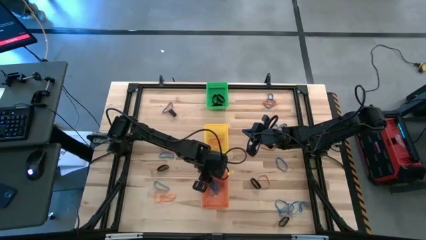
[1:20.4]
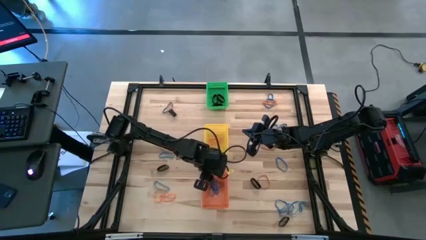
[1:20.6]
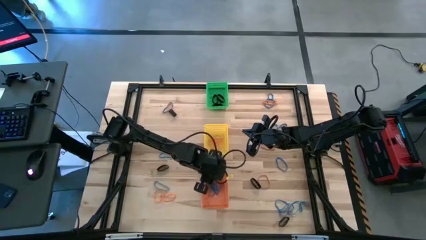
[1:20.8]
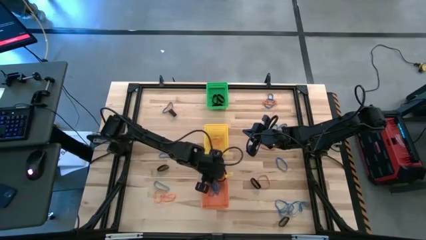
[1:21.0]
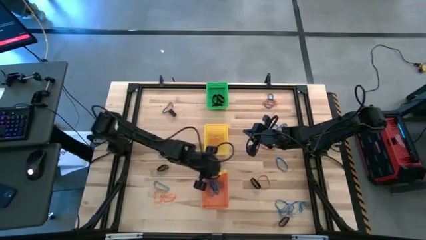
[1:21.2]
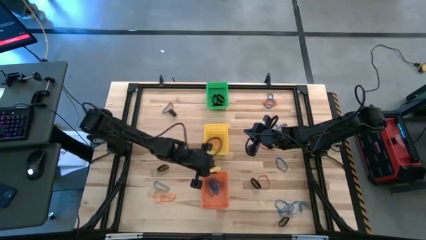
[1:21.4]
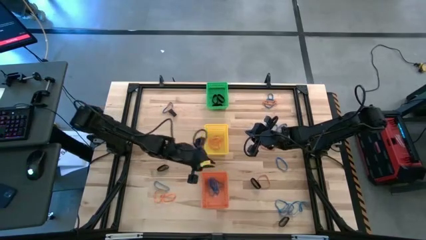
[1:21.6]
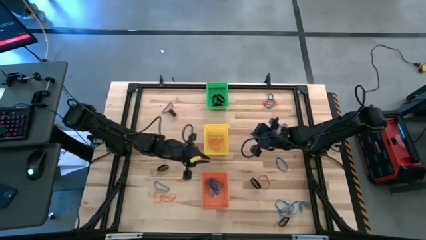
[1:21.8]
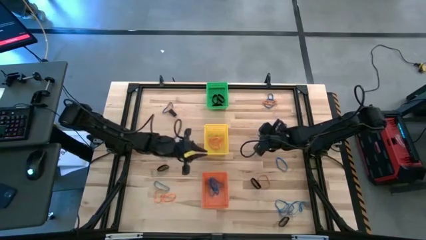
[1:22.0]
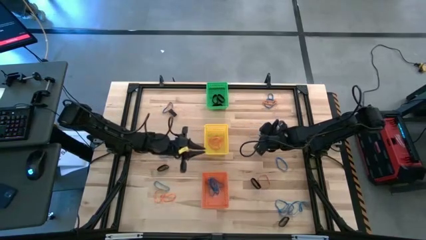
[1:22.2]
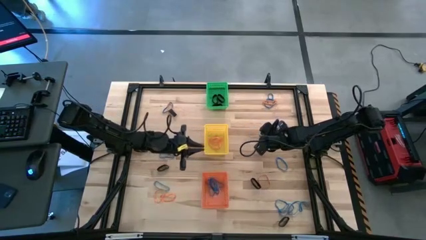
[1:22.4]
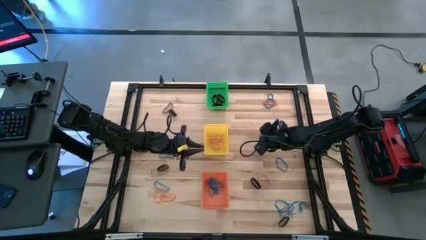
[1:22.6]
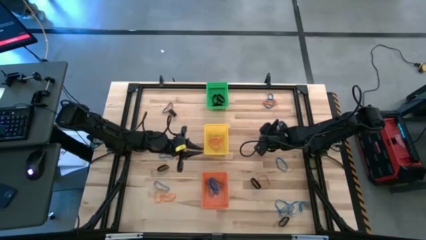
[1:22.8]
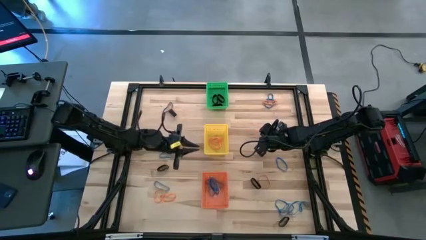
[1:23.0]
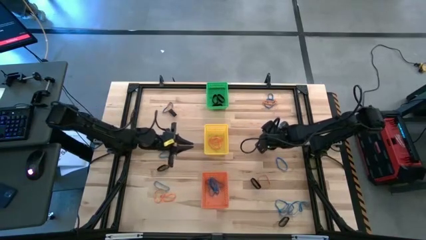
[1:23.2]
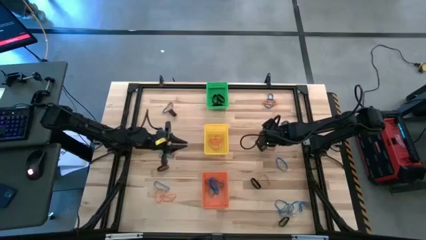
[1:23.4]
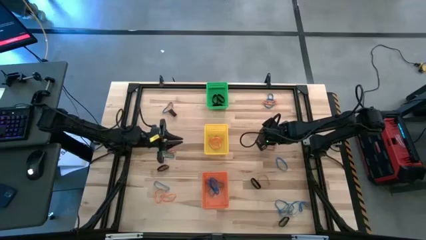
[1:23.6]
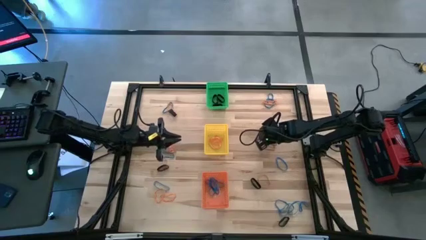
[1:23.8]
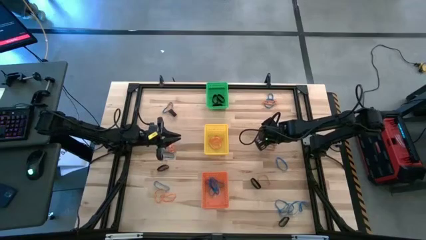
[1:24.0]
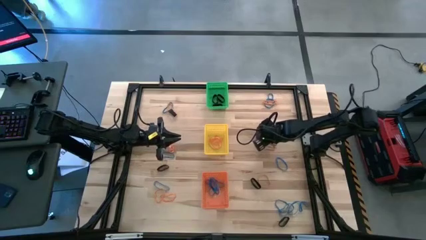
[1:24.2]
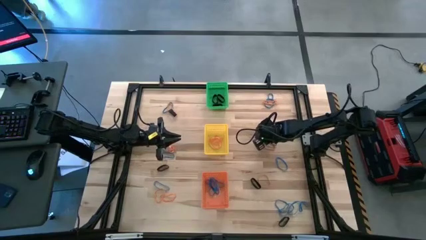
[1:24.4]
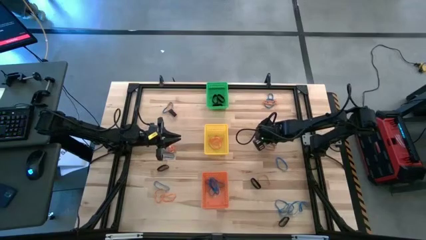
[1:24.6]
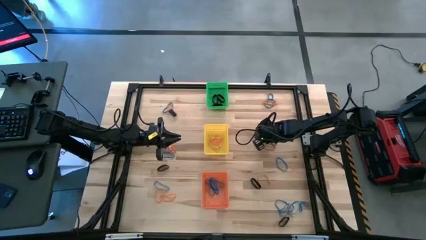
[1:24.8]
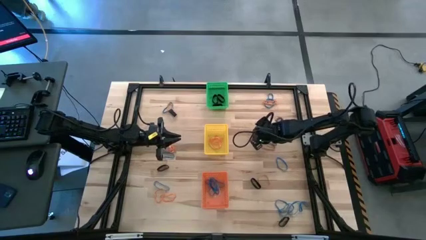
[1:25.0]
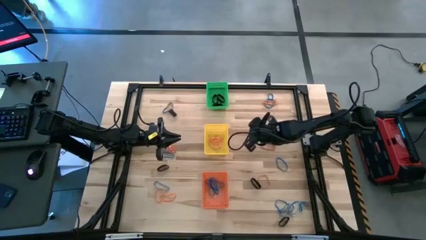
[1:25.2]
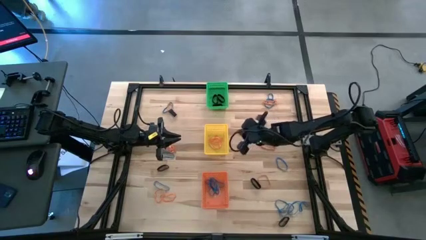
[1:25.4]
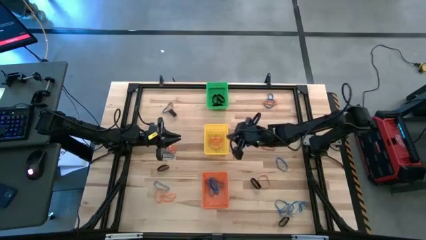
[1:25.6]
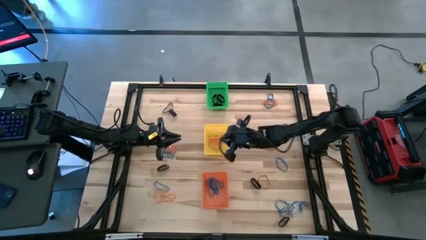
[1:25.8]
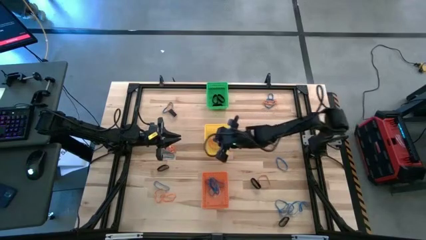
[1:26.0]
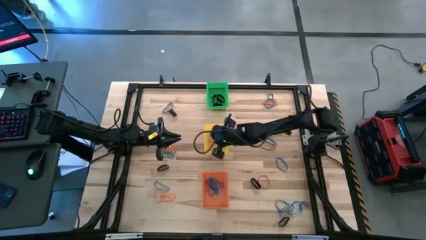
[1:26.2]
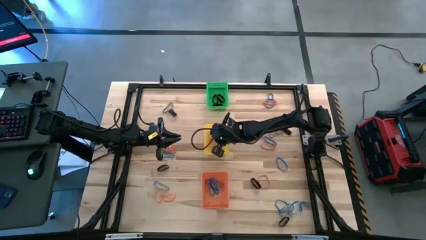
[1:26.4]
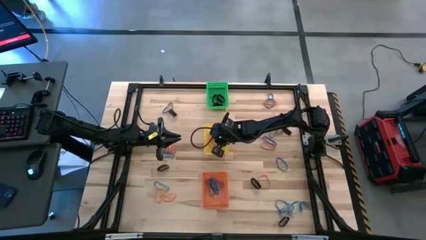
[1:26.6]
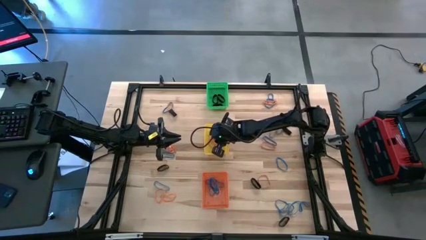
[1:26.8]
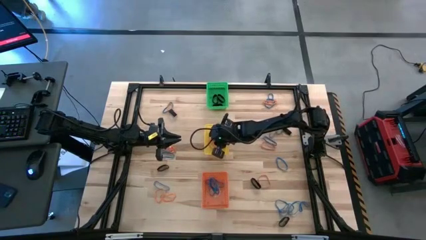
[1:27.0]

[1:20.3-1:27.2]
Task: Sort rubber bands into baskets
Put the orange rubber band into the yellow bin

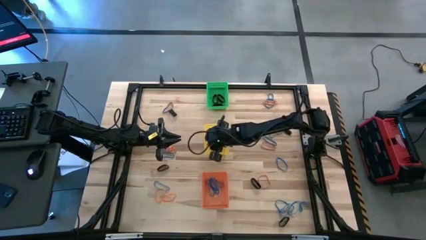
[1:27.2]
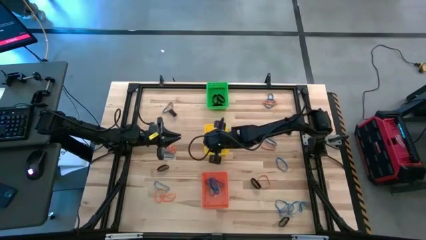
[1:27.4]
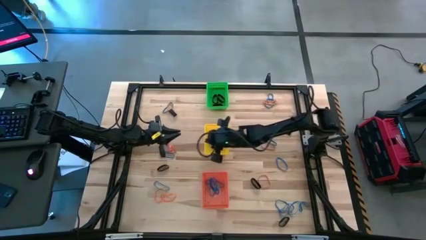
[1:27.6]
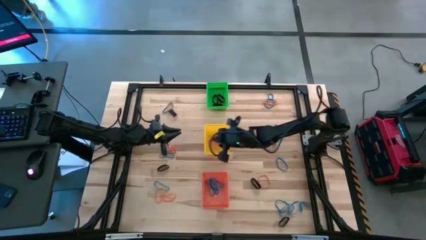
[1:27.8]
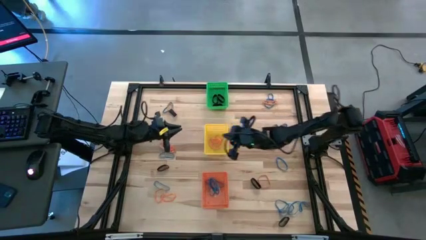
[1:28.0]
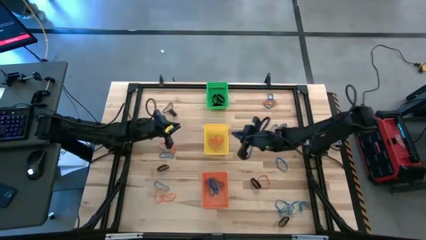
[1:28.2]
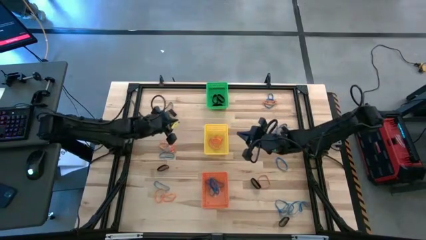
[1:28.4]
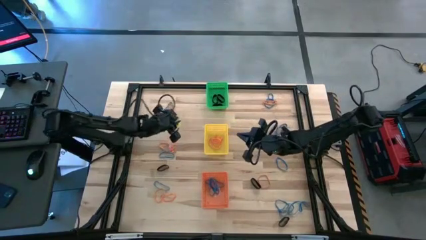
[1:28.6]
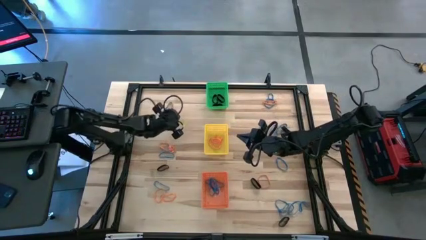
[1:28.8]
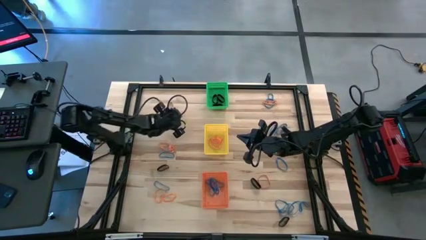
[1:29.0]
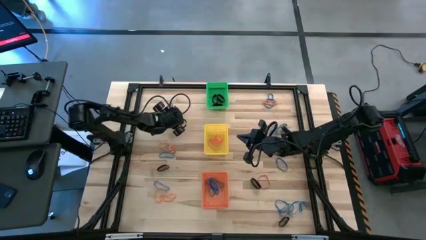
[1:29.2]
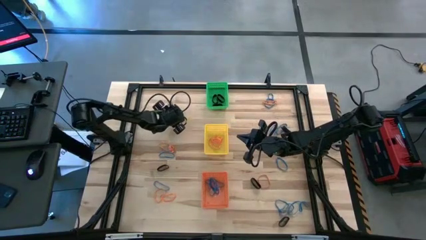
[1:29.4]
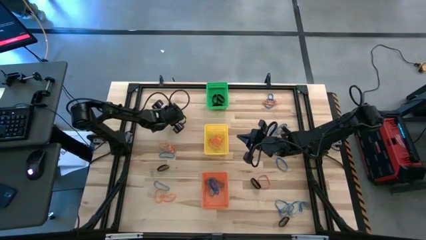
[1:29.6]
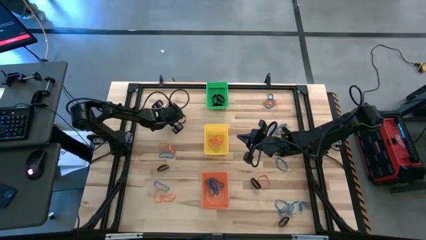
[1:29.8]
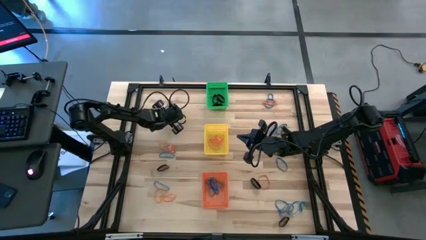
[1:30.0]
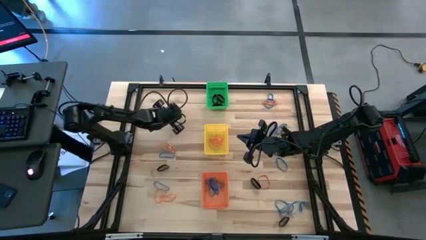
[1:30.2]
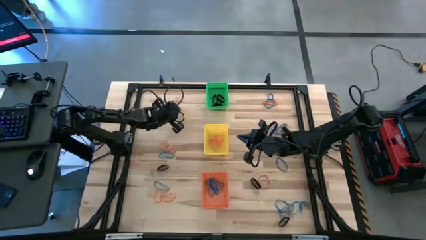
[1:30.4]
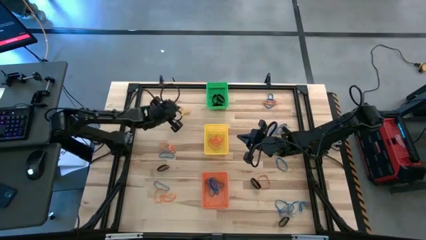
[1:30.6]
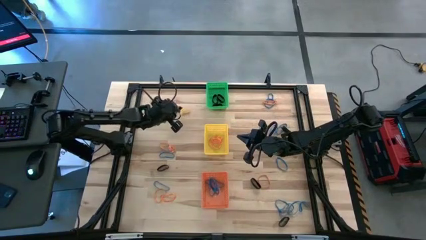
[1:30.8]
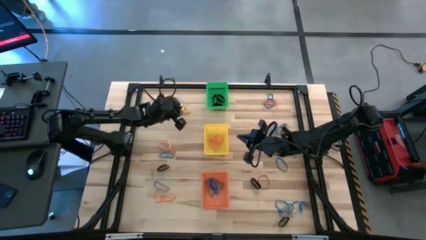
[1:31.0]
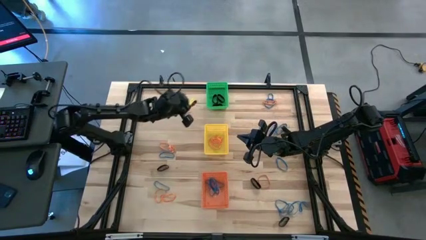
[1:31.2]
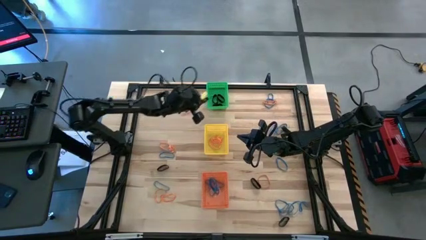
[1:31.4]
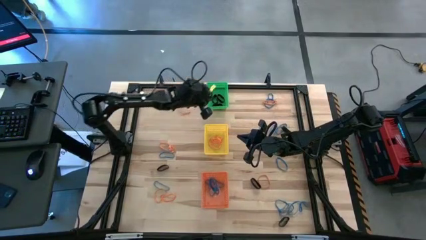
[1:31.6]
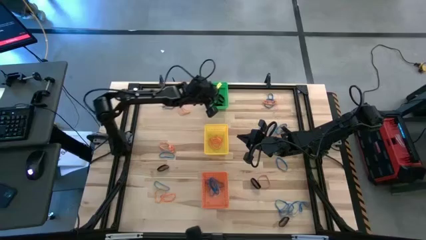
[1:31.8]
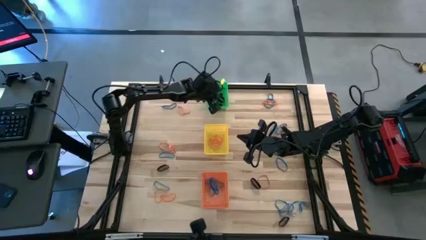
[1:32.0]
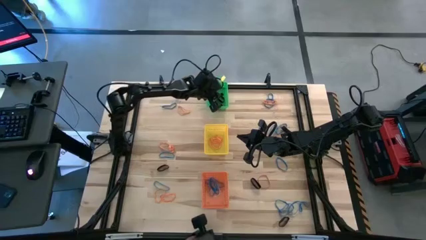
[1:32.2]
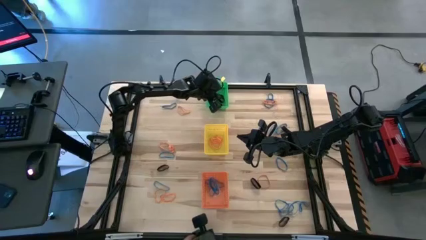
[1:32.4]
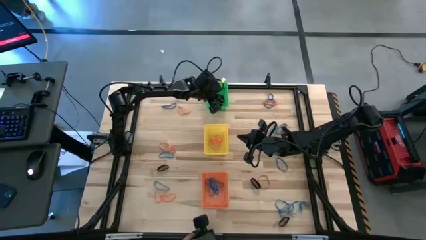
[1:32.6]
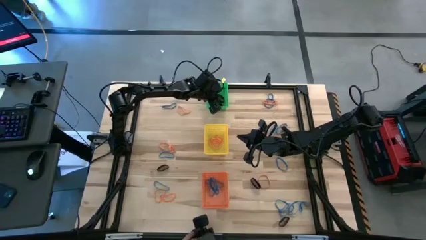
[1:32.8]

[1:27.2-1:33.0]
Put the black rubber band into the green bin

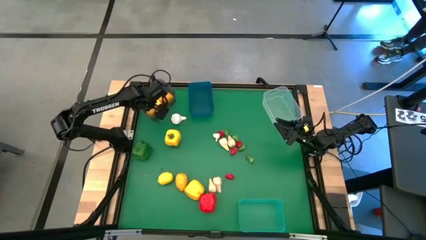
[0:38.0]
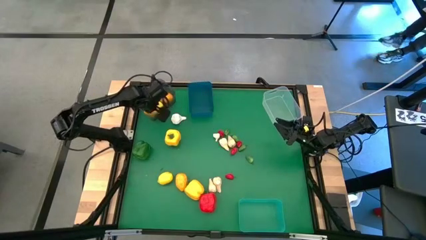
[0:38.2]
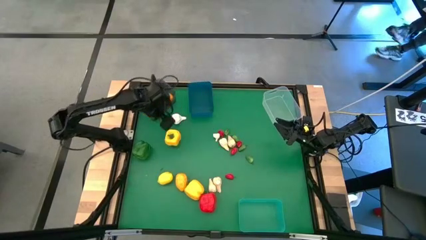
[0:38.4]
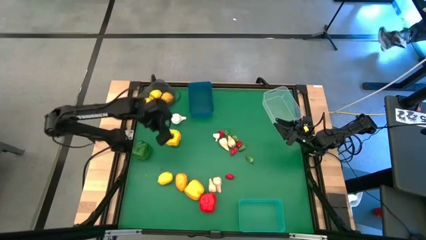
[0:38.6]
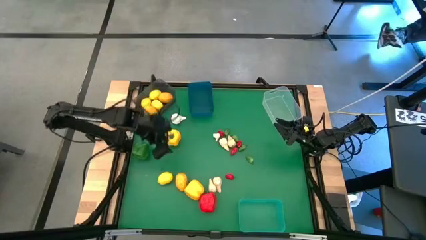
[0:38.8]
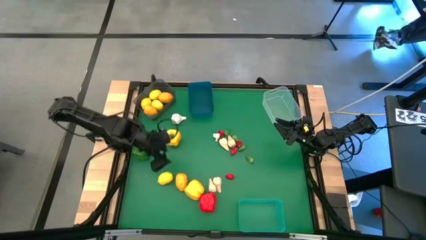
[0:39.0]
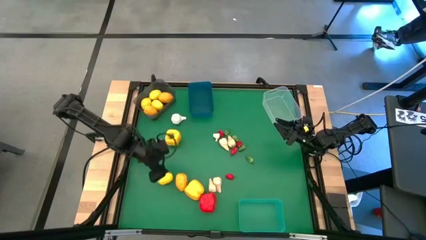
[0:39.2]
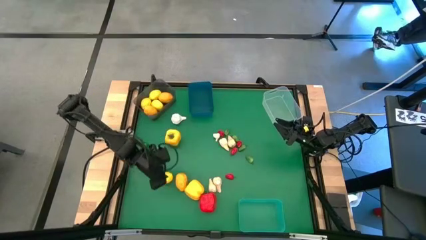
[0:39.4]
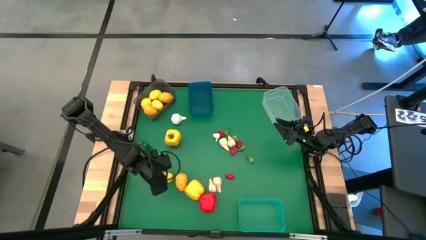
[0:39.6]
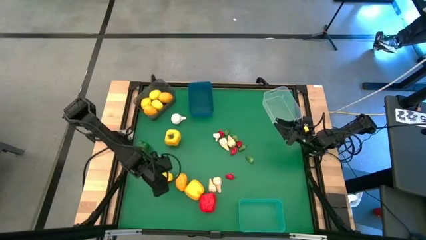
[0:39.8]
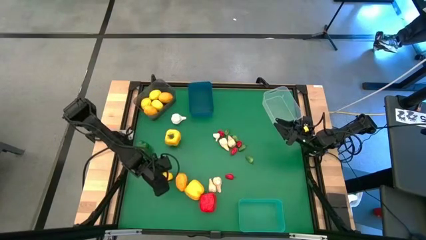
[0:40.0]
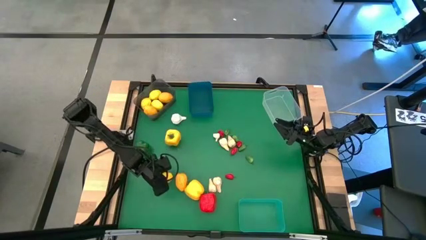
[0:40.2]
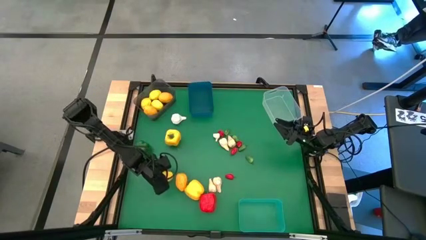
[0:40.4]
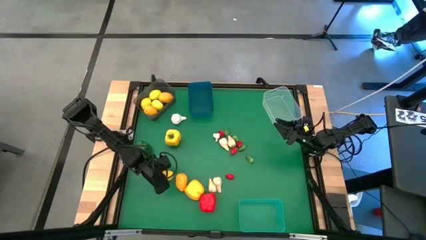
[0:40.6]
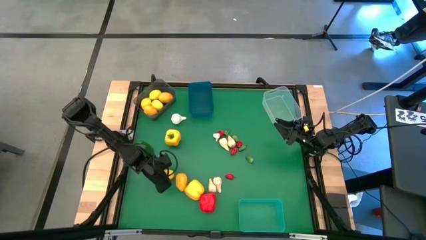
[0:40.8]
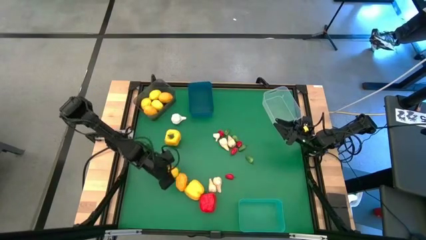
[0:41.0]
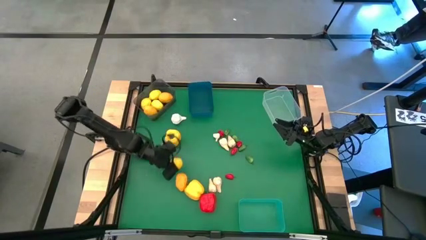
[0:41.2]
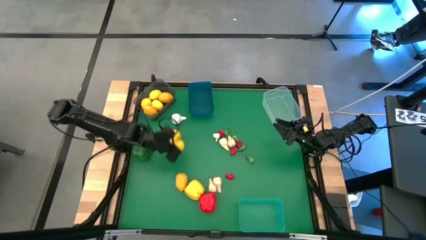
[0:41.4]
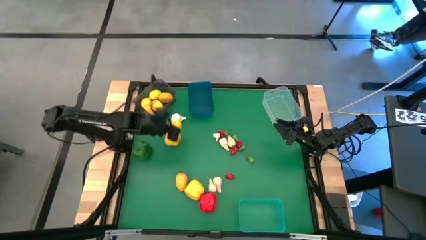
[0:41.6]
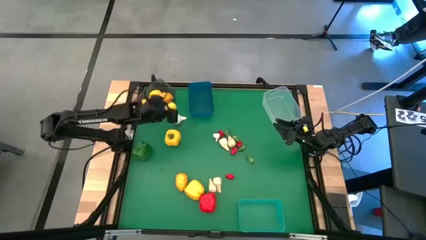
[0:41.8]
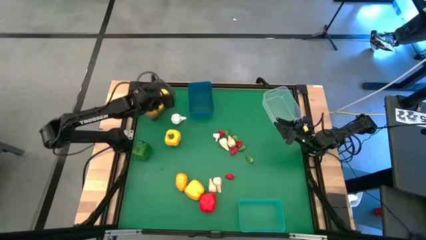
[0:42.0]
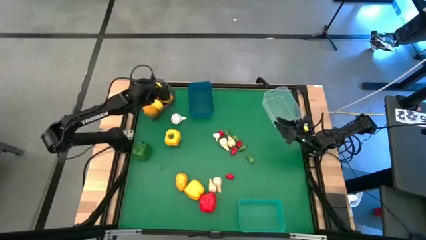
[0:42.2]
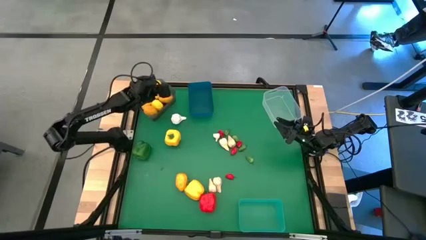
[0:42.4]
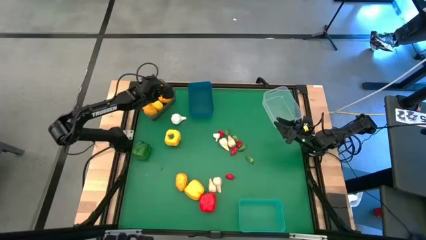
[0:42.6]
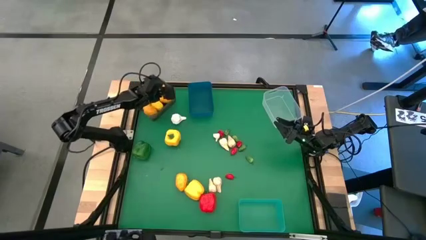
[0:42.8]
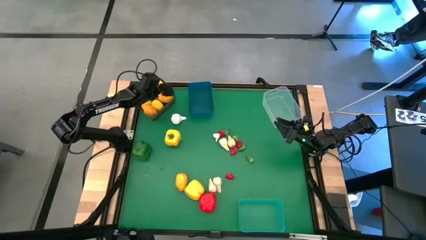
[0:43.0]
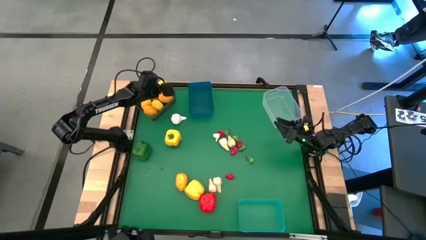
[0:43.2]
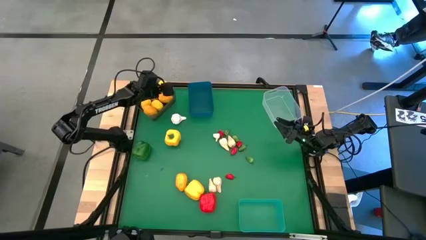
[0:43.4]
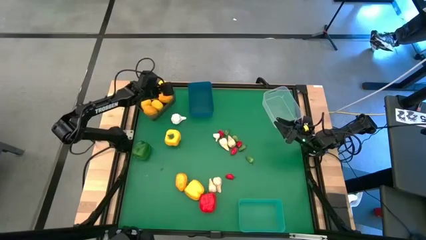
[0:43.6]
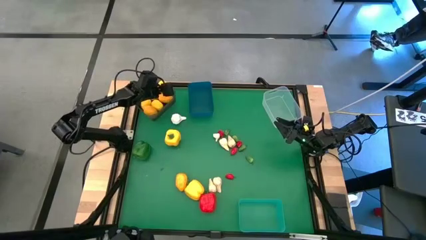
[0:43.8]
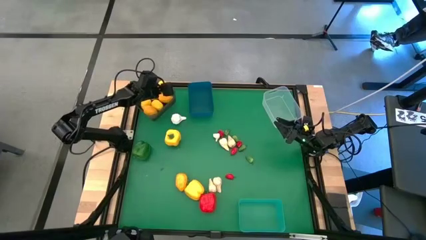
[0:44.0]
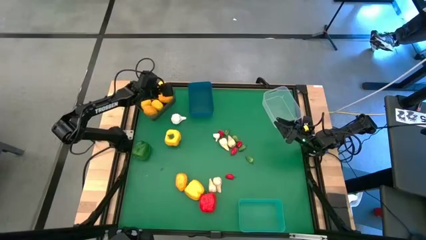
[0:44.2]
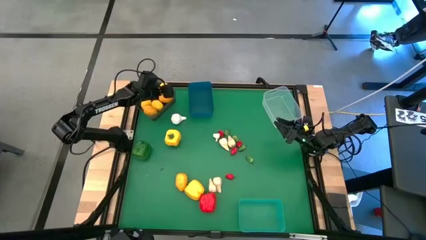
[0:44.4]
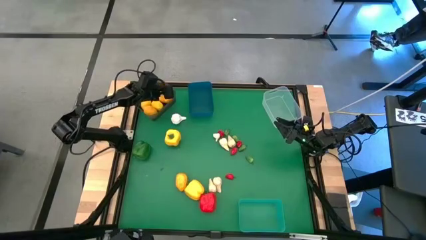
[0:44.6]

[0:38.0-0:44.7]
Task: Sort produce into baskets
Put the yellow lemon into the black bin
